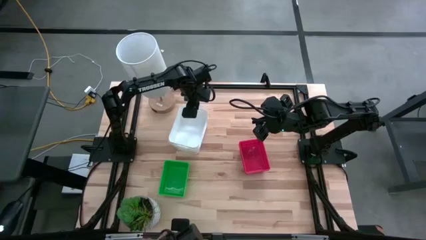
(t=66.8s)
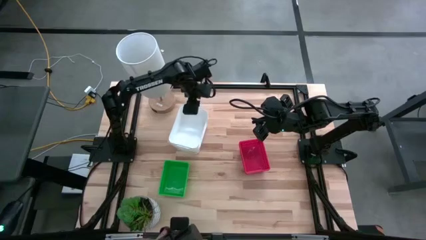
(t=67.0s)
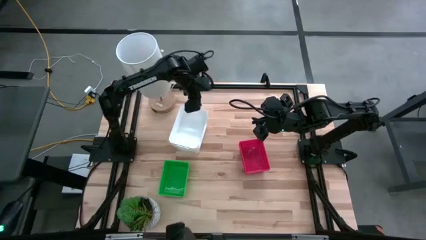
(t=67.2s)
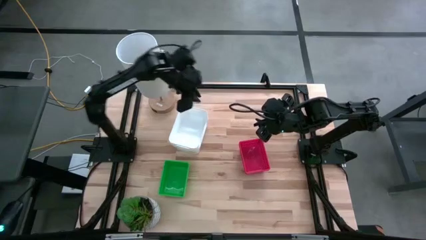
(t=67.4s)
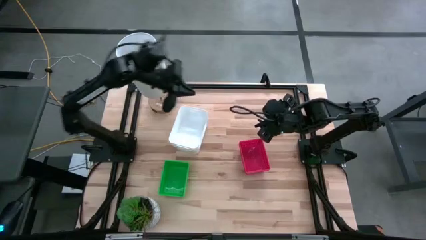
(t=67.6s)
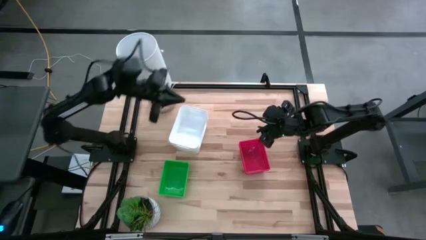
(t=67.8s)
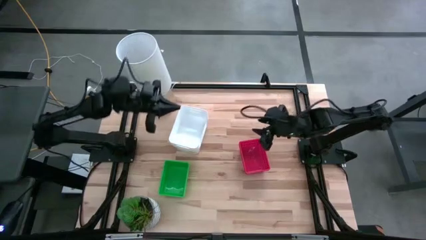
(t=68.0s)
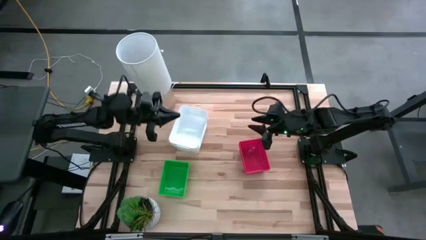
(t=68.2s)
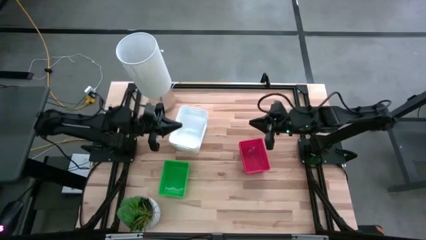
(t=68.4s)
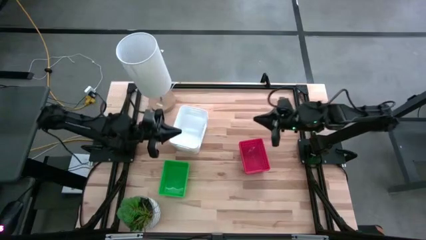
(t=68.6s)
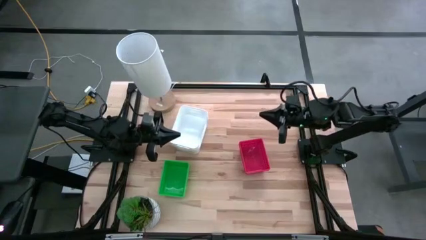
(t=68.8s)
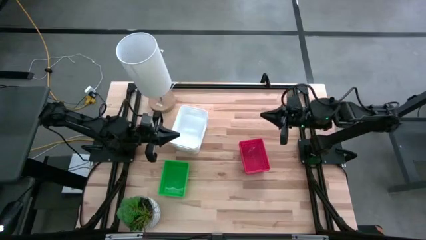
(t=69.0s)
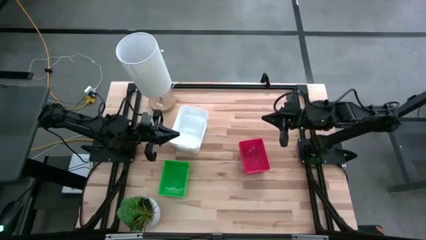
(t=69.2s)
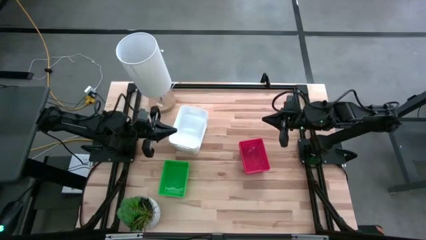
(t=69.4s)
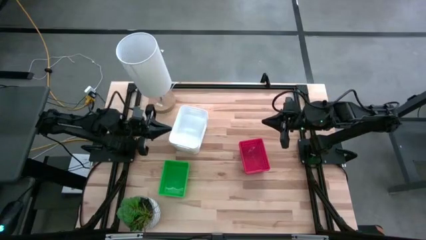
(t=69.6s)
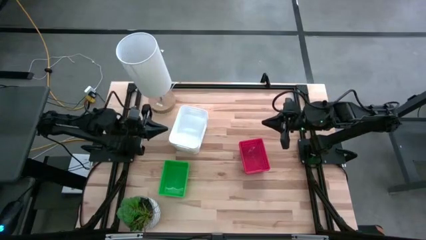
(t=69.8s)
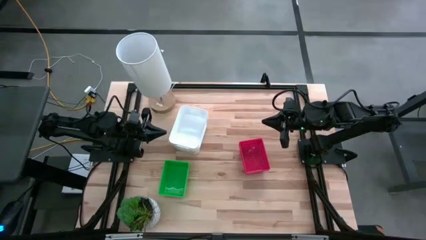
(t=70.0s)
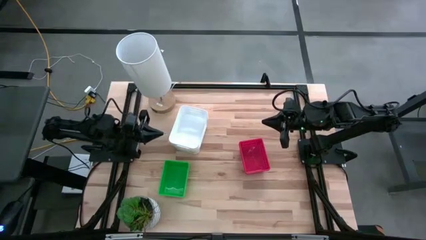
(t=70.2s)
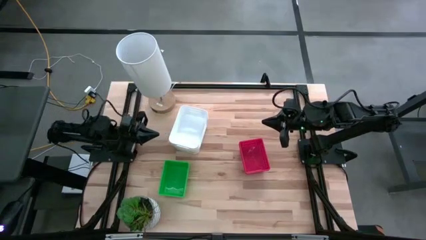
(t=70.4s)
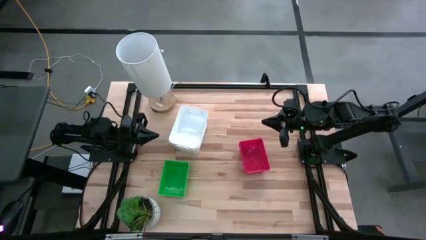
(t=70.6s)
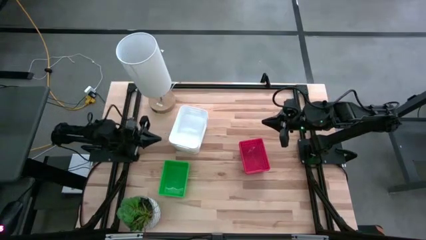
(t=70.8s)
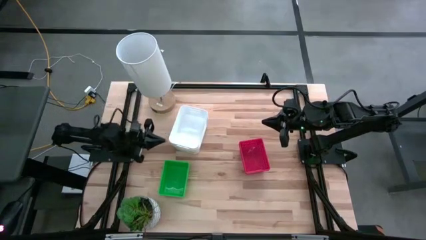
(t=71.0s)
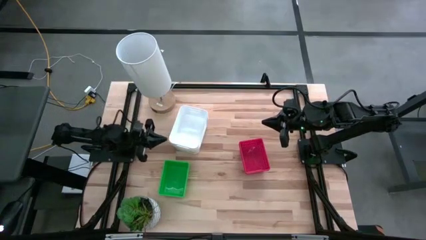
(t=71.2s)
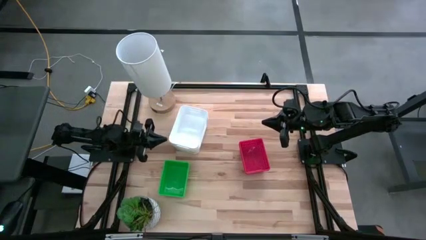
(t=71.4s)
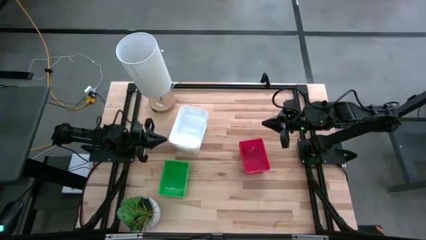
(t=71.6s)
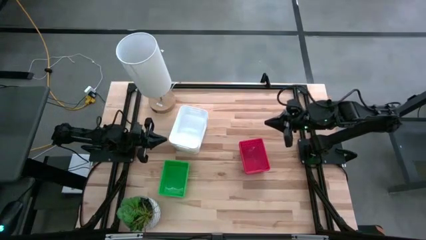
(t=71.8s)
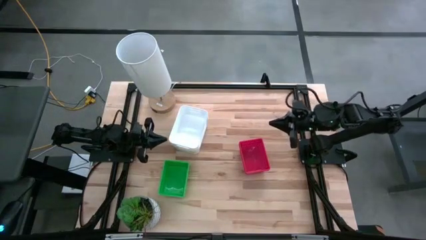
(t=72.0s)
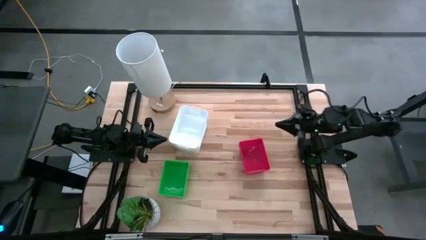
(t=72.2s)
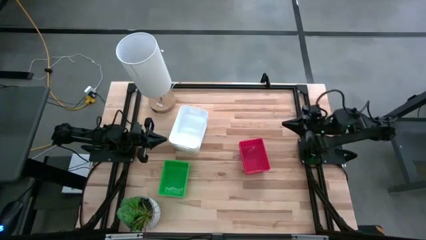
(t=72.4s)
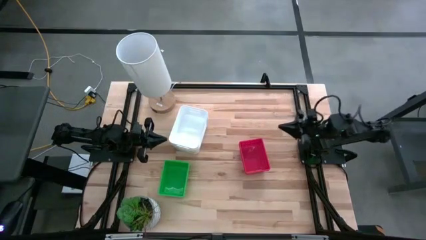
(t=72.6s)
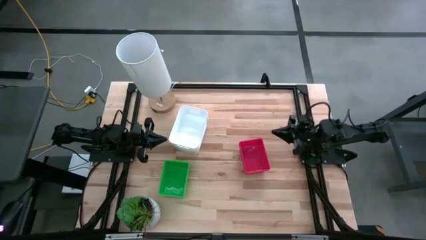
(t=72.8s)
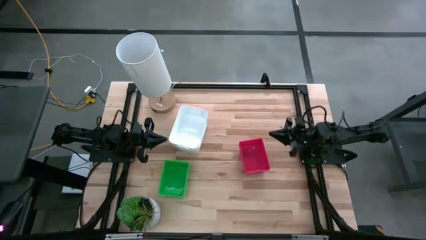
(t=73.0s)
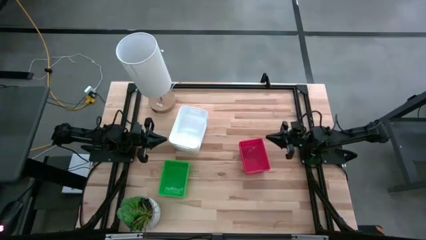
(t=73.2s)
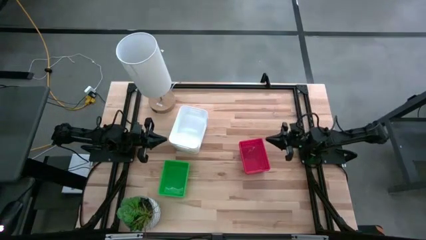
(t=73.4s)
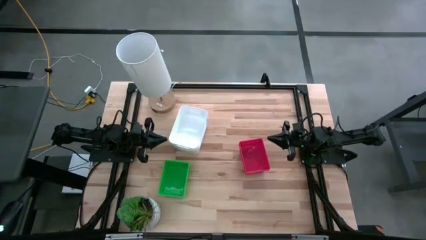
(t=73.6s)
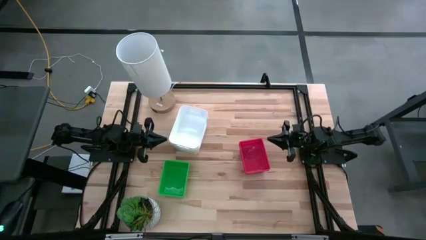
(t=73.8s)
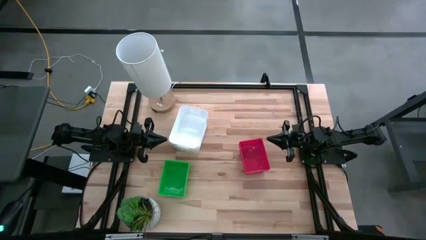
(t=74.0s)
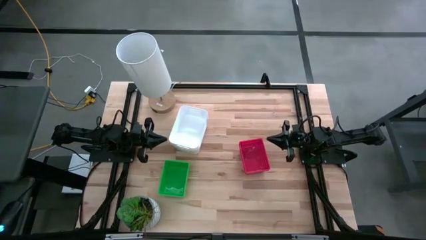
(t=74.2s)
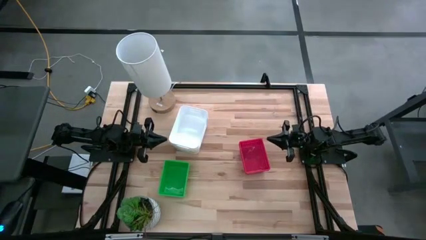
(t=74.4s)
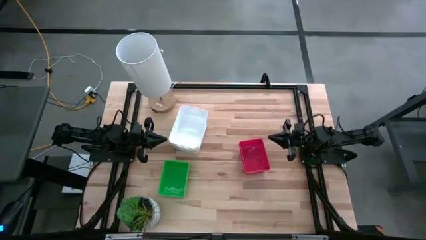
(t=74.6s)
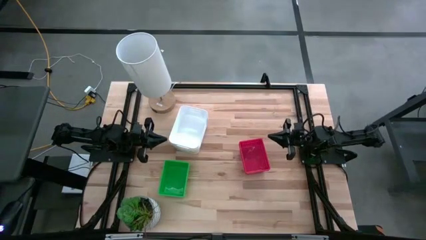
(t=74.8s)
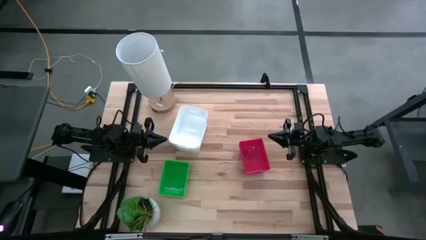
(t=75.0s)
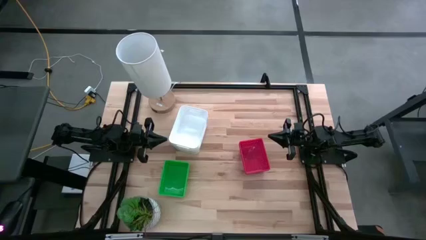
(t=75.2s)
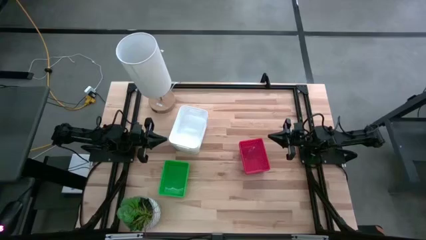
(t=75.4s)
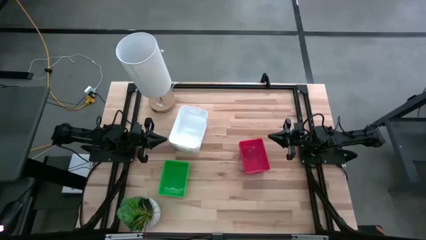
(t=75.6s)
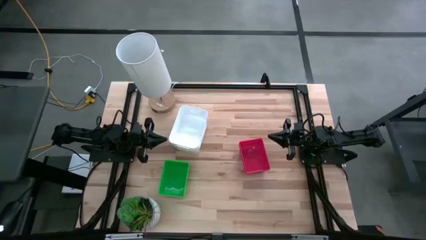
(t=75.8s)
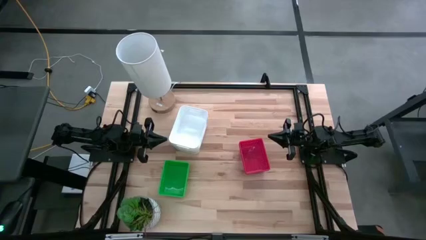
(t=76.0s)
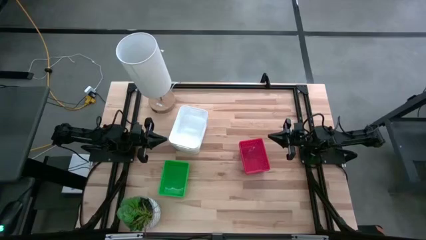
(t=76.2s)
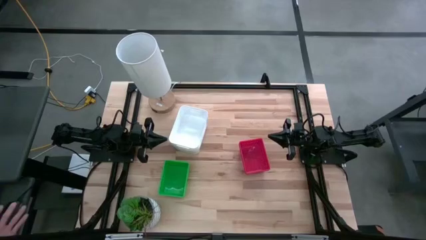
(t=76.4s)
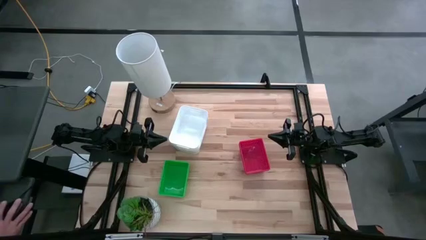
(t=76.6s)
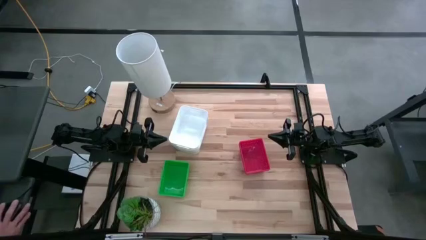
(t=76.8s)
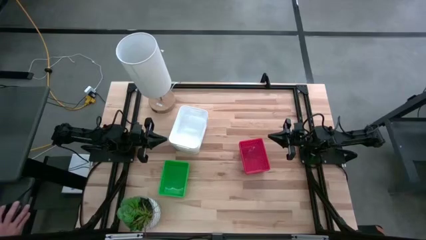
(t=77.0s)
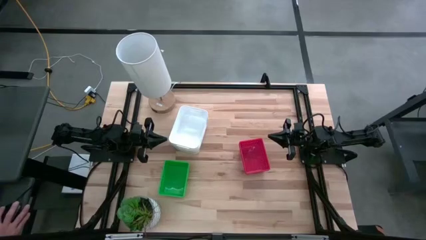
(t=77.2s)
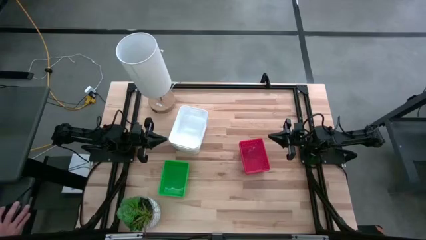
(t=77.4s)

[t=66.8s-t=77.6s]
Return to Home Position
